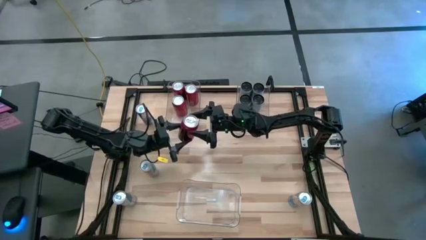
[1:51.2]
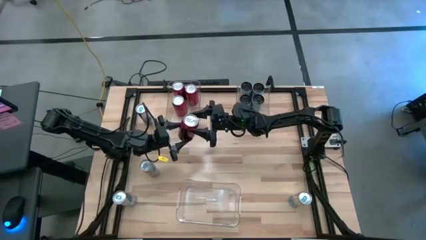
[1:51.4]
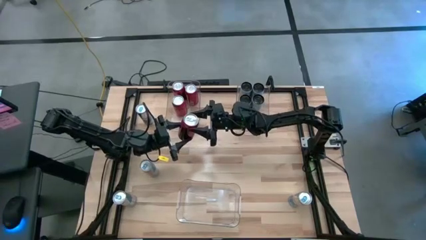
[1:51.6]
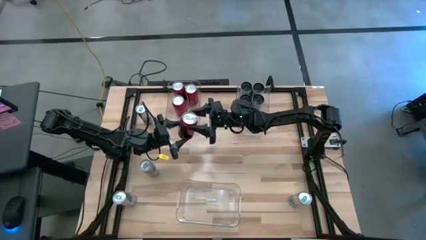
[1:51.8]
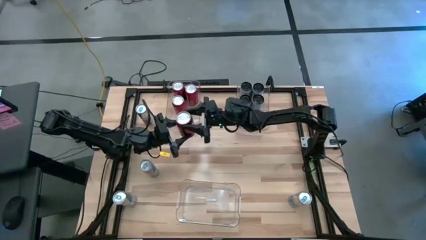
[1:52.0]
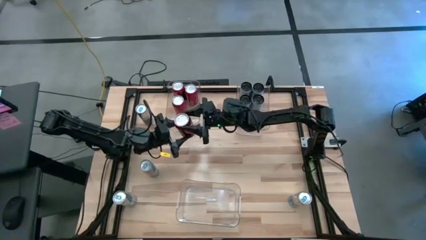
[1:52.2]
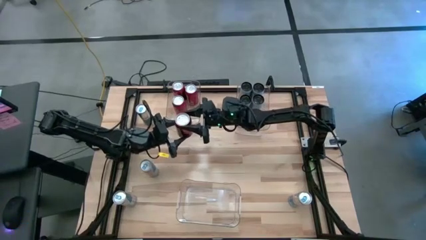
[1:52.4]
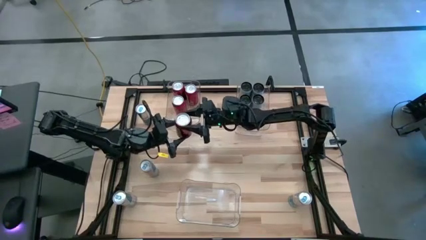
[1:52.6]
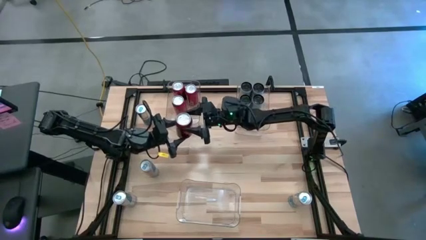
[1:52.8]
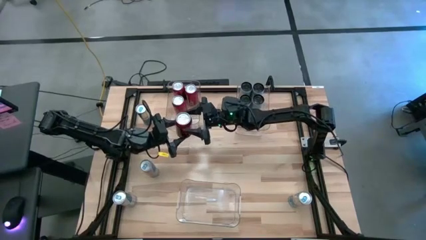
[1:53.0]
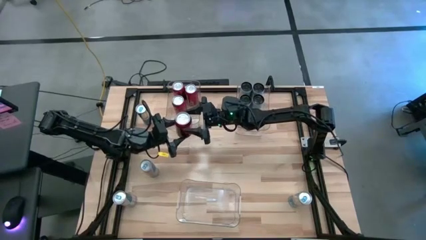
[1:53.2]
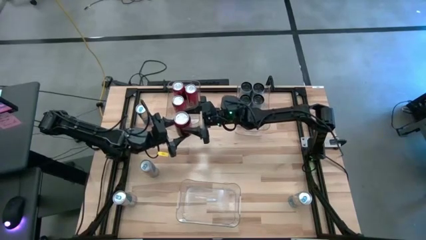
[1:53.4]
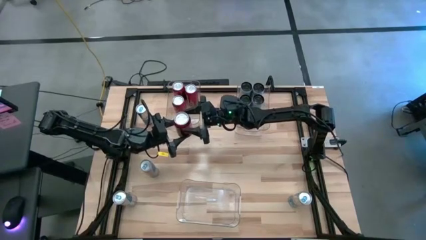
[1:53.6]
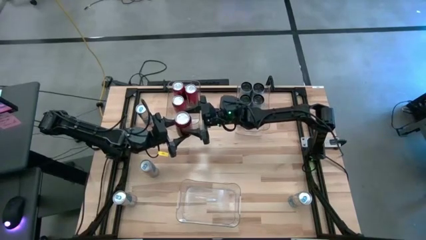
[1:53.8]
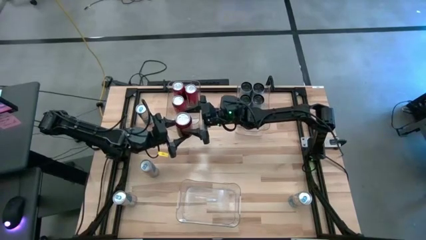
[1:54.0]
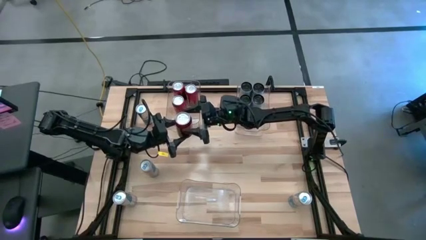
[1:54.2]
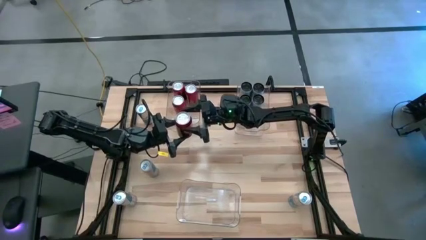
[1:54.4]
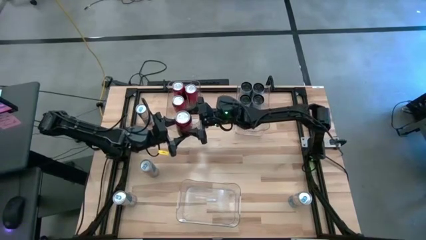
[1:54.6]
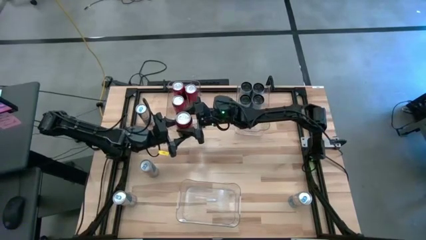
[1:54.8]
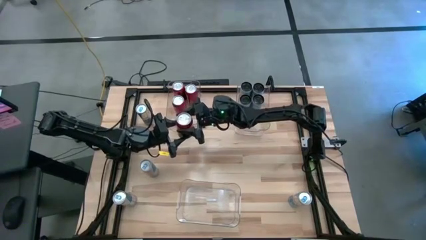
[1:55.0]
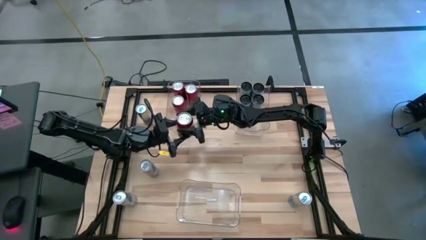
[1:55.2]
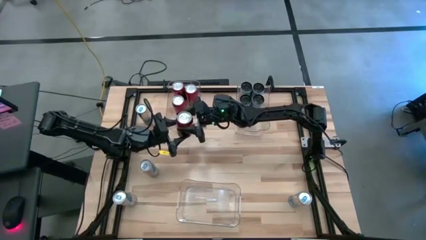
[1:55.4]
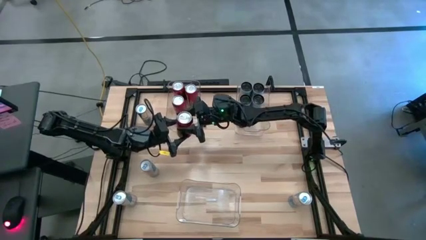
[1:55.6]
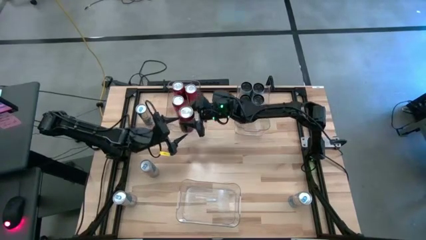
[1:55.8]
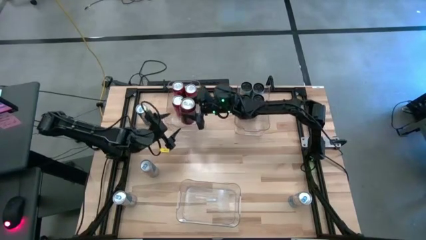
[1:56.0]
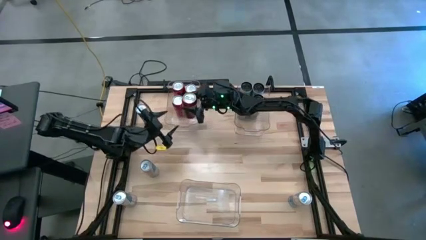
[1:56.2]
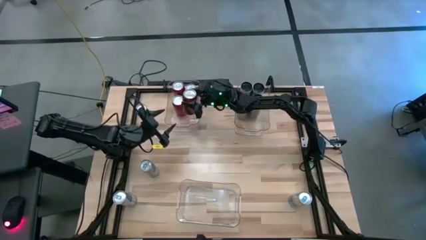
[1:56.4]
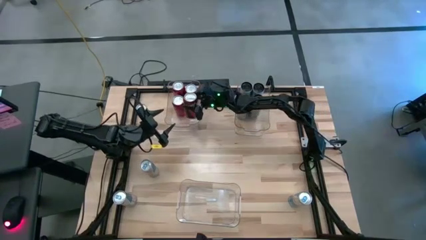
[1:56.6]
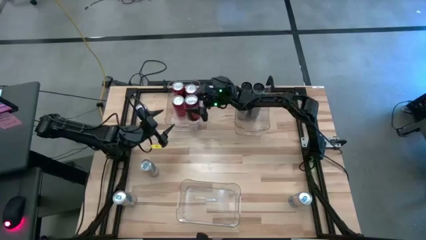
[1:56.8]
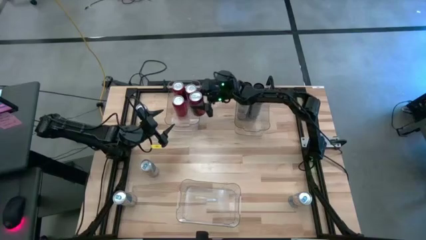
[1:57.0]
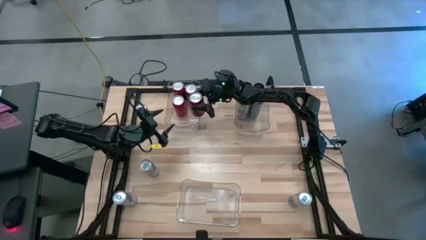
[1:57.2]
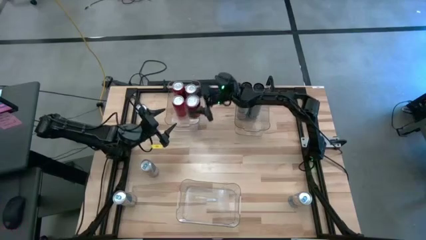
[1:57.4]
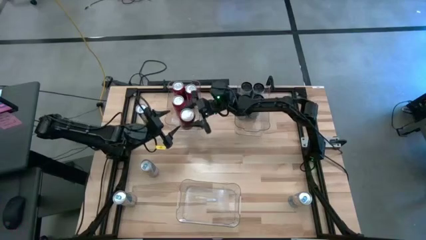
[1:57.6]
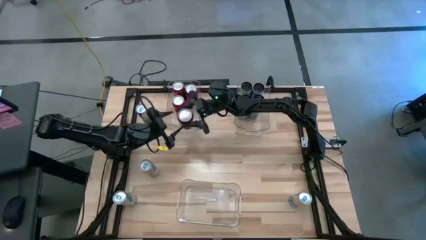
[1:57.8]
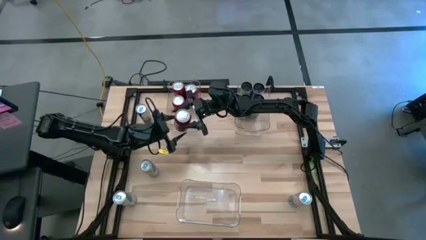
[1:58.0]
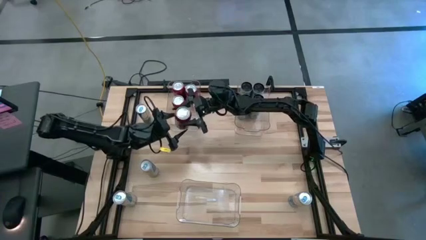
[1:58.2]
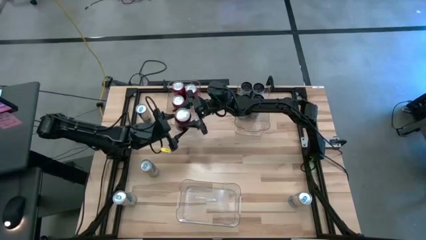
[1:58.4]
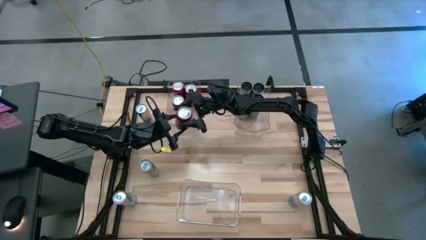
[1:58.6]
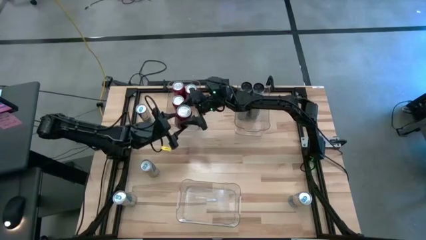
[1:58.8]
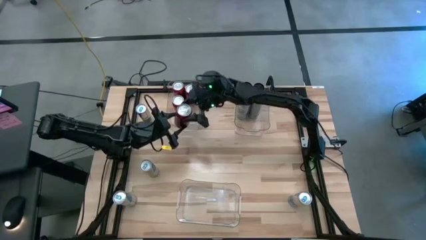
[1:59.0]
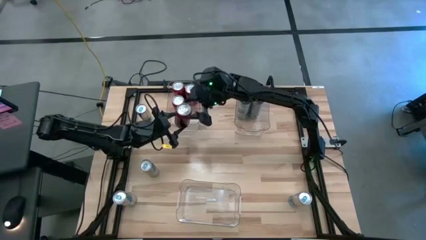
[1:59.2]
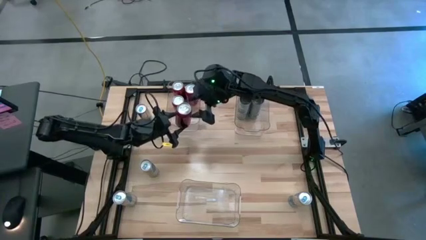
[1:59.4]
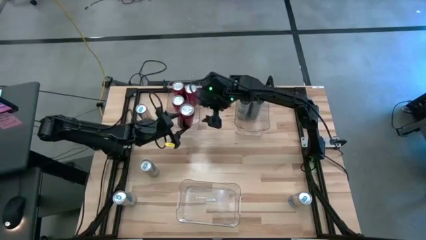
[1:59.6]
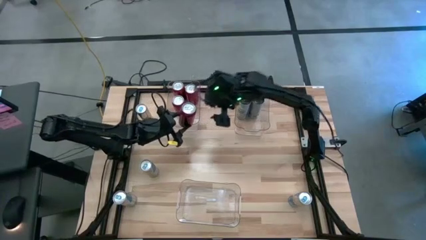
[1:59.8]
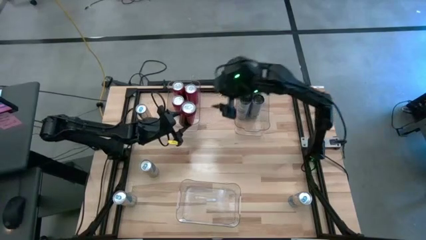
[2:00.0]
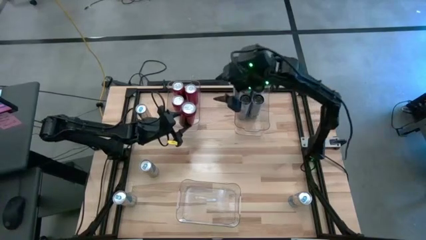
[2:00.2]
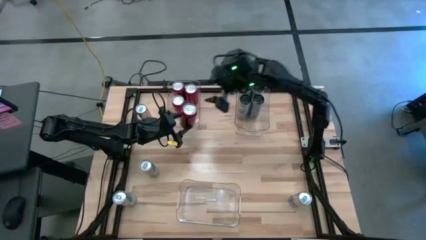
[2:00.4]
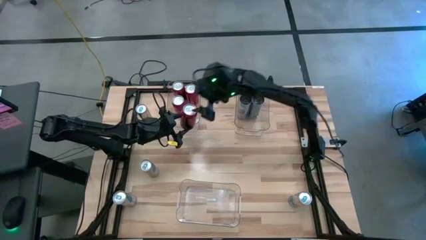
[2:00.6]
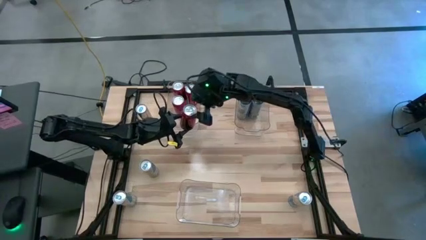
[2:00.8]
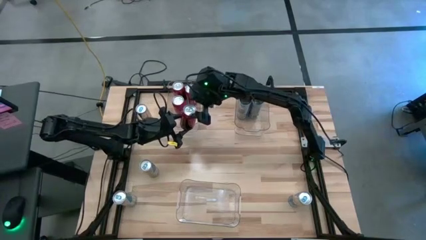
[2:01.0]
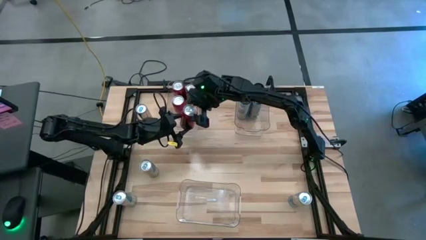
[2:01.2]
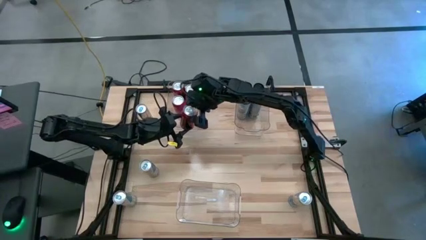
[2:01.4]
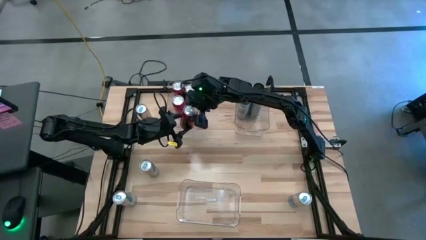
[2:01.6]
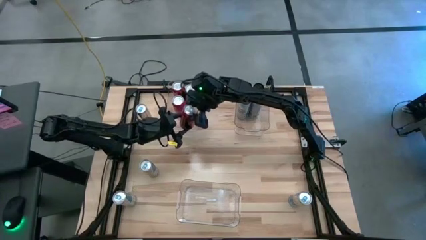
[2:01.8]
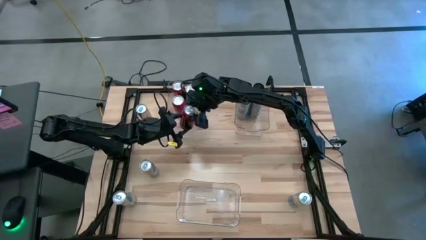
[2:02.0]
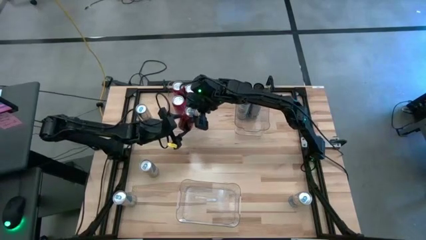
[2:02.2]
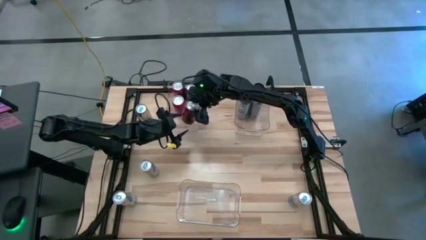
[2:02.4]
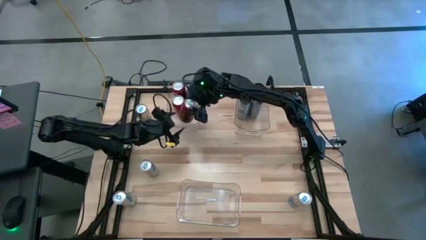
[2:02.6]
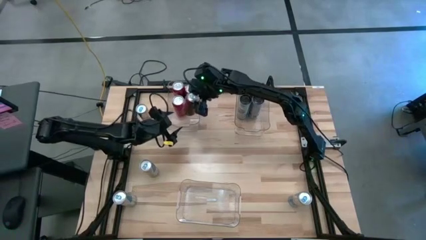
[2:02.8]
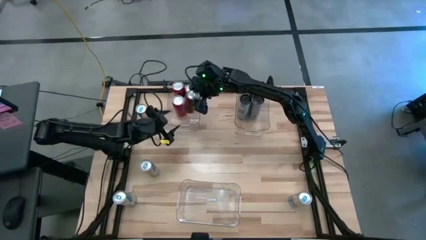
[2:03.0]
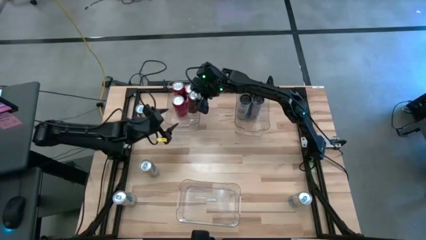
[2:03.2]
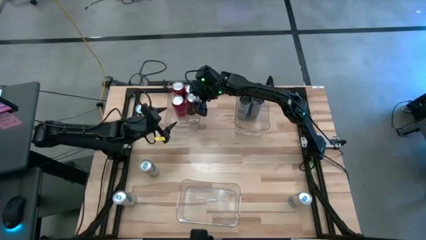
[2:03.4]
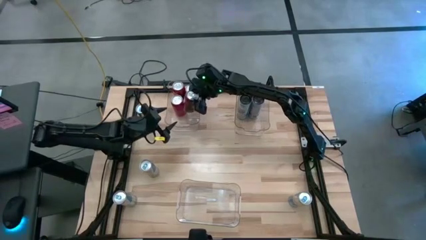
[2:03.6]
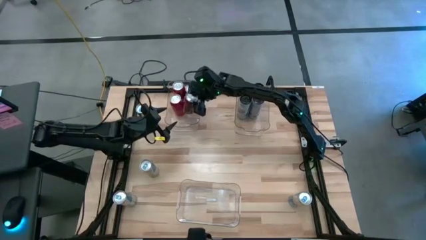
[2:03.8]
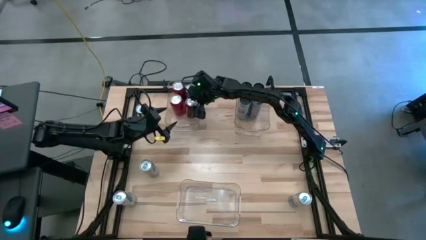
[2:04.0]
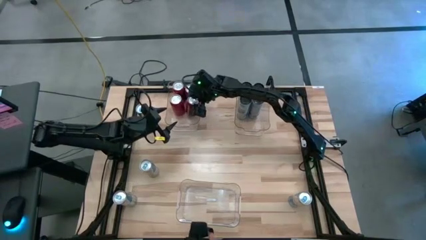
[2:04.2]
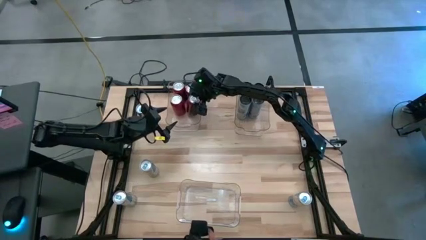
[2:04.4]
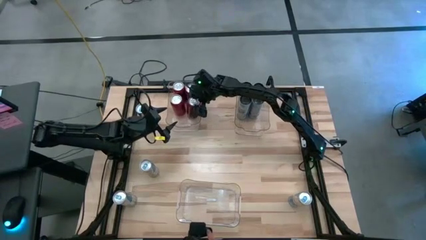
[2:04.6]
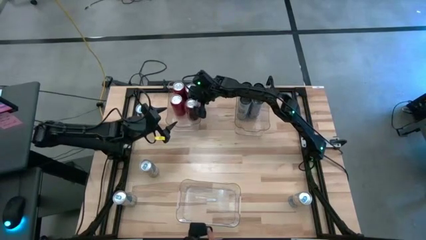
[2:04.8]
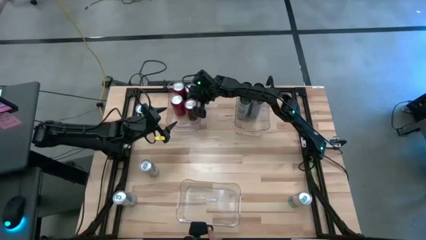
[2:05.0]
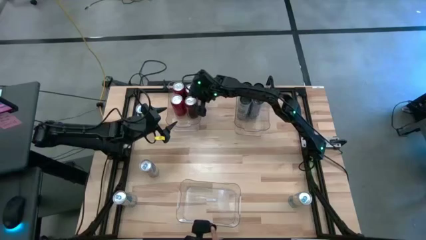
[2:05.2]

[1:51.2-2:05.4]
Task: Sort soda cans
Put the red soda can into the top left transparent bin
